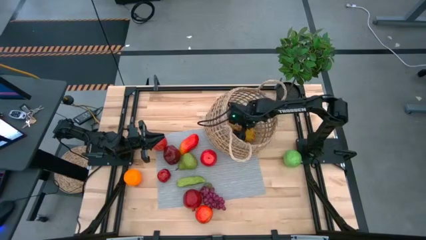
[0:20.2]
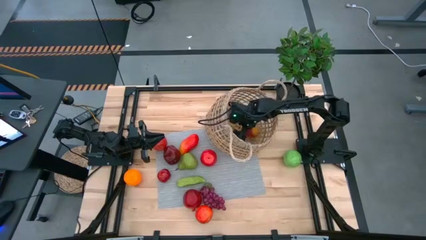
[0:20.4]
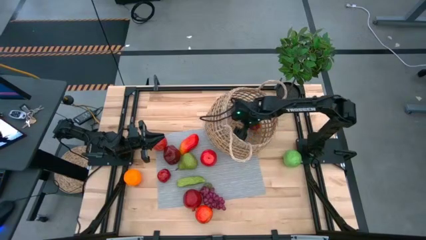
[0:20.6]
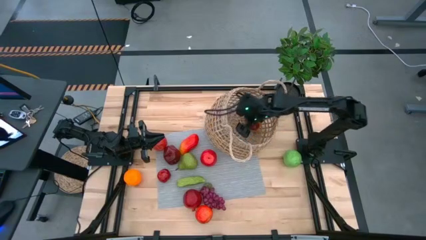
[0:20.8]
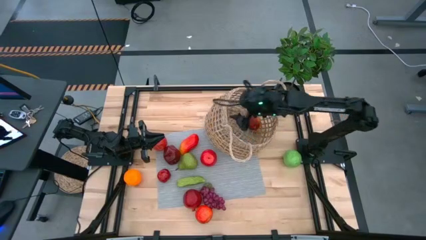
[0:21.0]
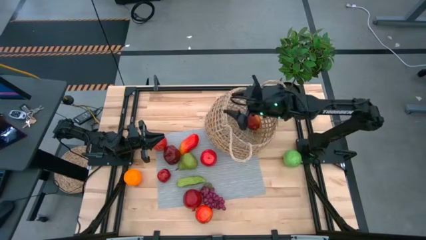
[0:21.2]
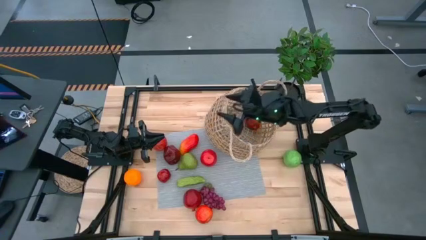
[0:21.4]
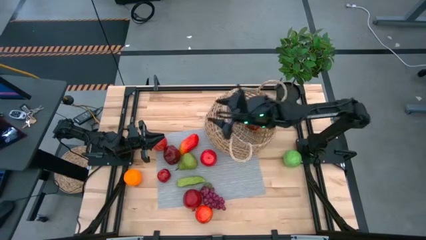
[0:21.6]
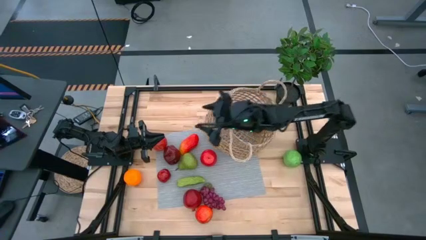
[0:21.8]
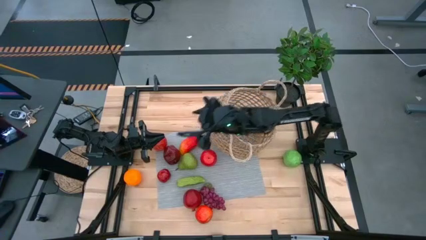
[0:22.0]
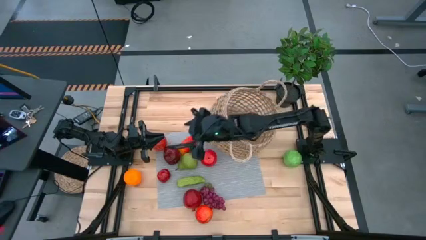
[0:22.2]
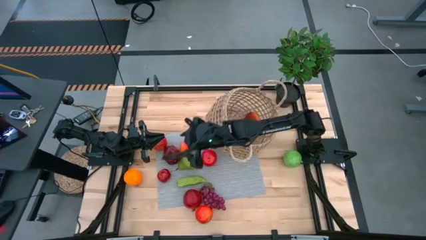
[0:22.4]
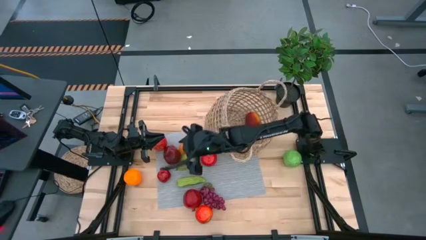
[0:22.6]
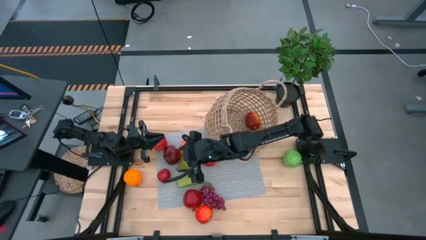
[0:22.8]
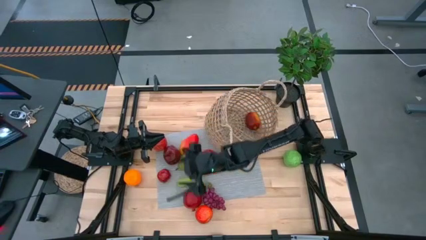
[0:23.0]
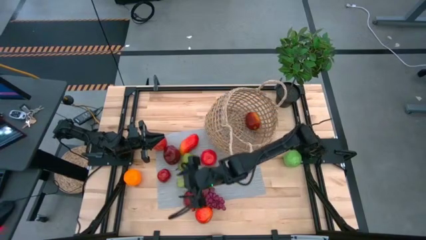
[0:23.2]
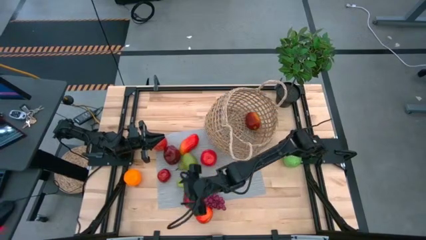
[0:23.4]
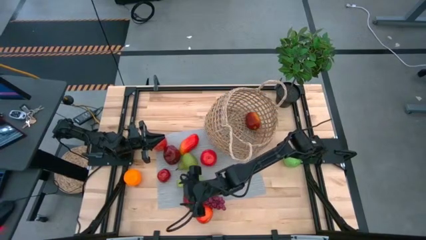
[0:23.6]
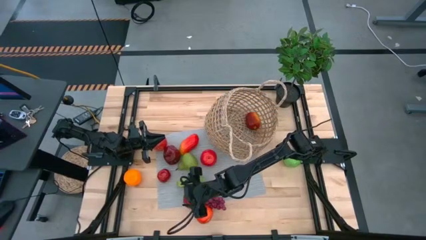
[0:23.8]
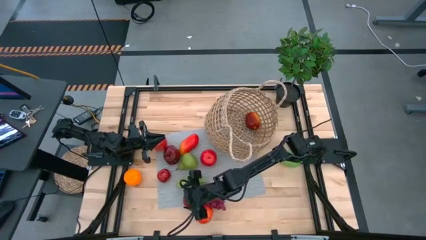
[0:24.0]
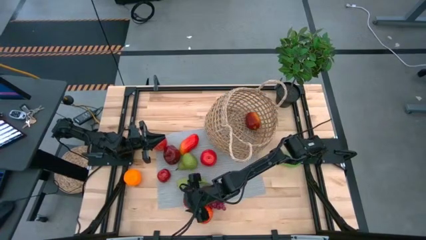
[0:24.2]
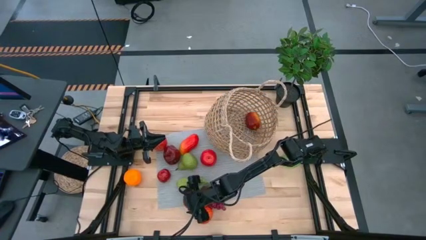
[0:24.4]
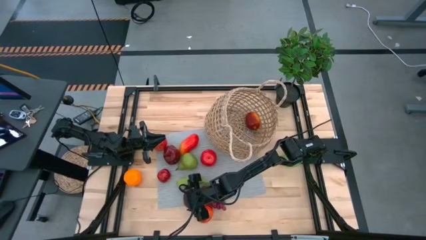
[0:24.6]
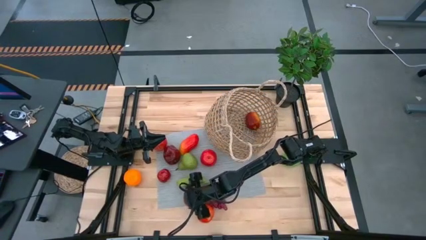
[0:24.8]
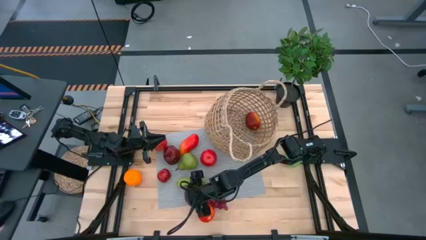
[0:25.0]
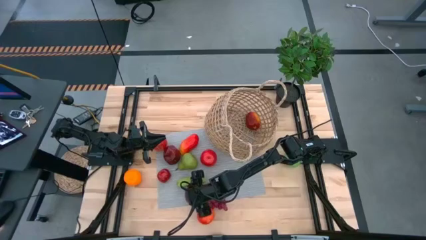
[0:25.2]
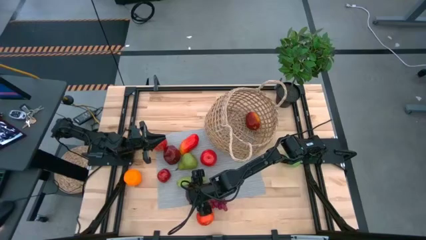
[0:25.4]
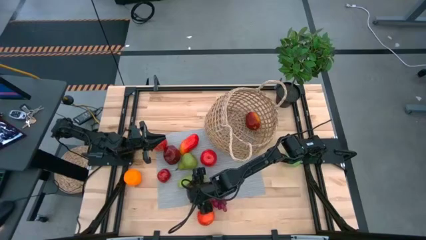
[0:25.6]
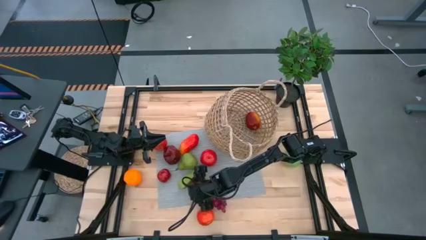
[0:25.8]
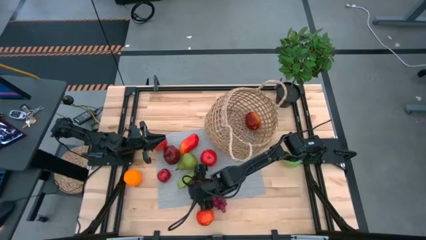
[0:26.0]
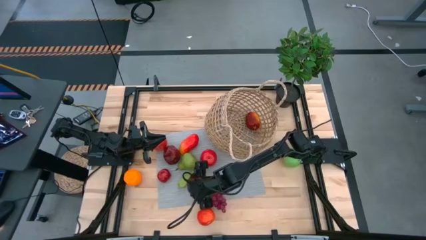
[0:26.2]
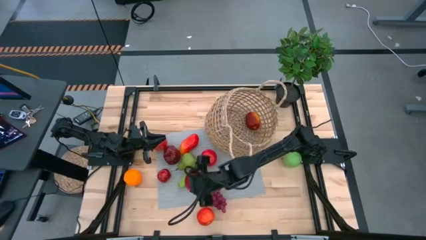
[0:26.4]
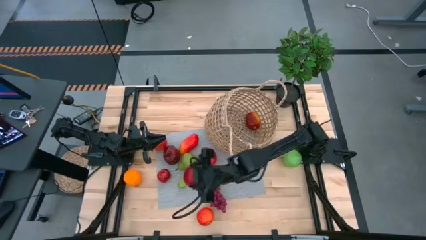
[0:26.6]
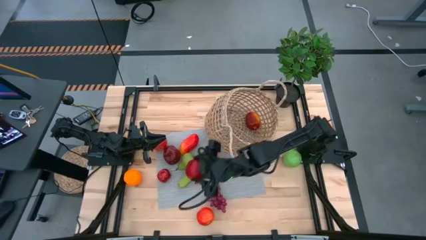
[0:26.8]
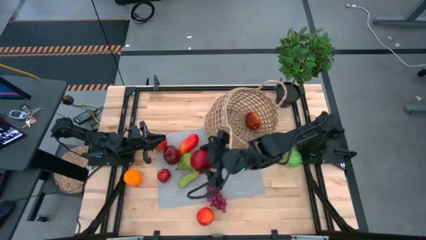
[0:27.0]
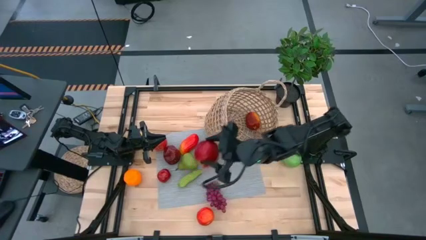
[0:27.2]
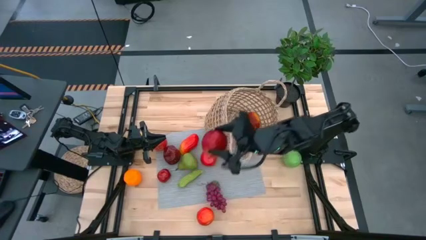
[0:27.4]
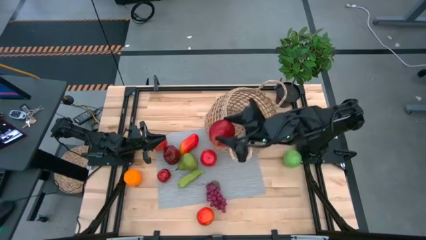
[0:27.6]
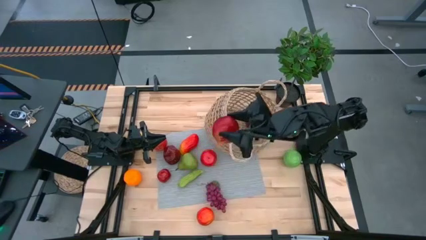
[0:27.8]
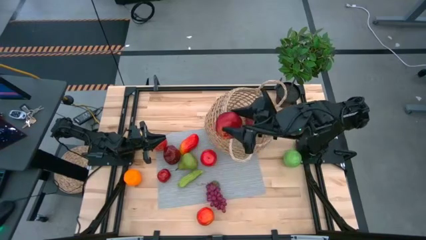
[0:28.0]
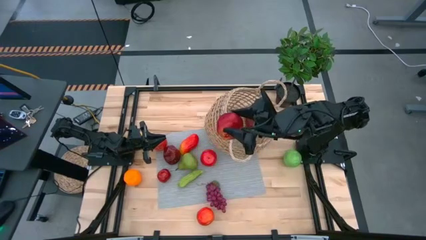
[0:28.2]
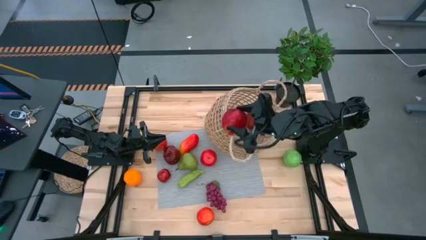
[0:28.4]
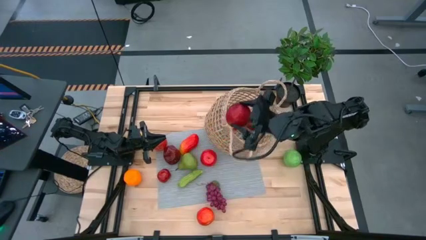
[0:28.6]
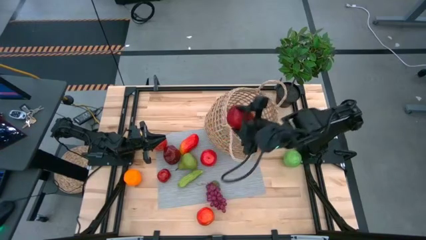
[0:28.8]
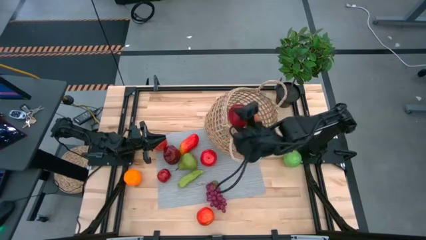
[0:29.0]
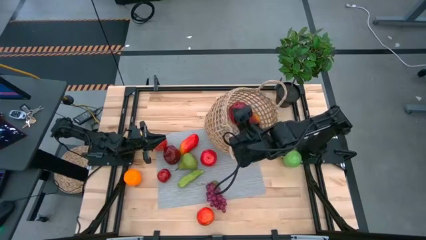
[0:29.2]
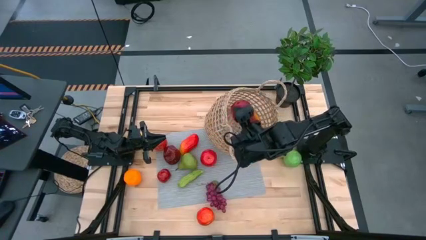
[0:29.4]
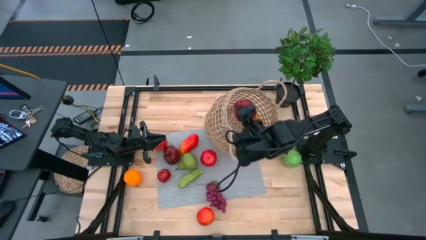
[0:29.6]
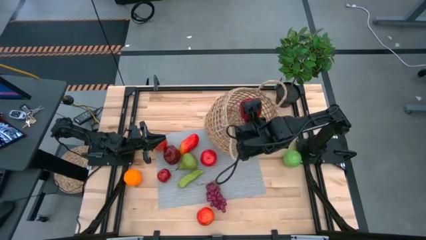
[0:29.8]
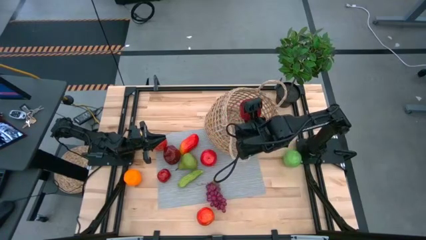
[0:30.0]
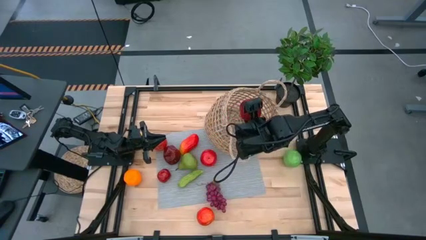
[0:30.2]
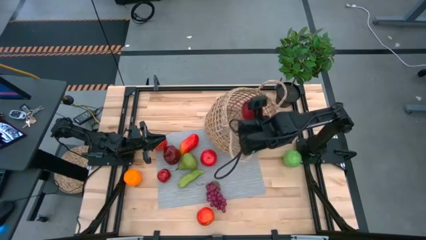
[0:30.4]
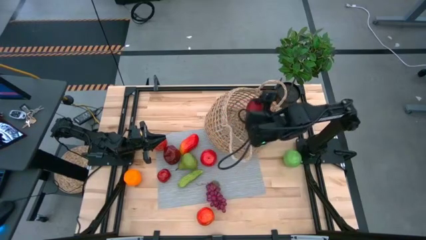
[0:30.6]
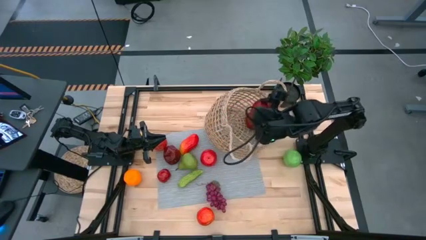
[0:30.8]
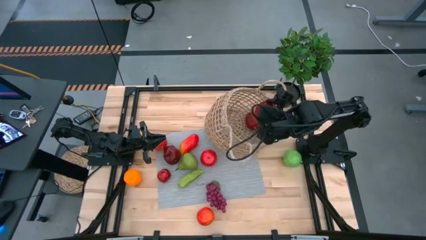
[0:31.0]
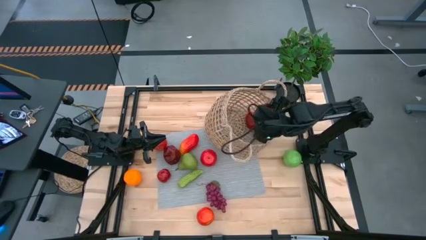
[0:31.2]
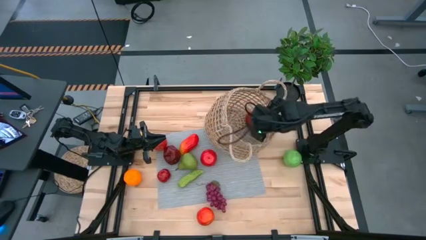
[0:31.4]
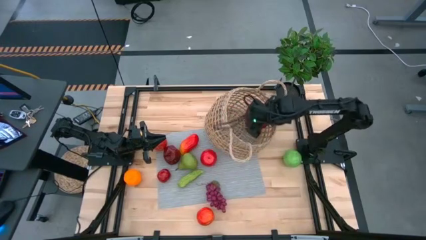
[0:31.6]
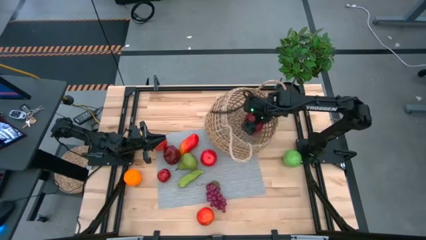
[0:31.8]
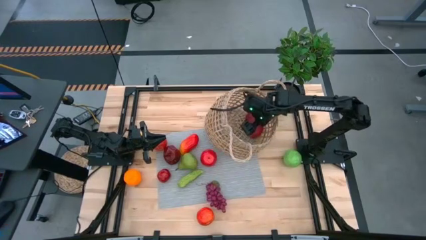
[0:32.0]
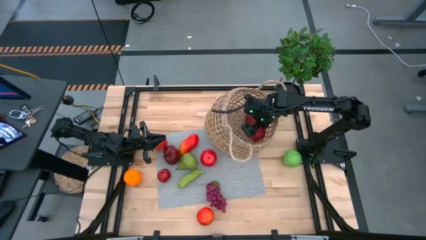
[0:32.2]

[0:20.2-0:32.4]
Task: Build produce basket
Put the pomegranate into the brown basket

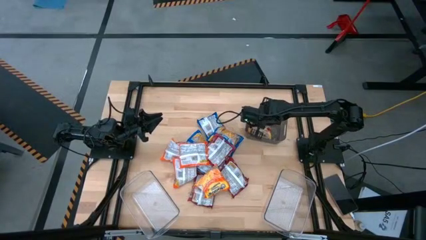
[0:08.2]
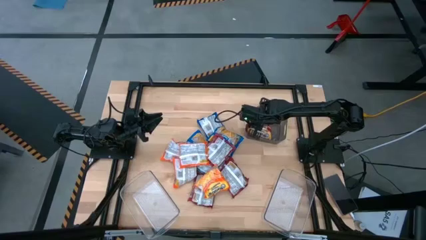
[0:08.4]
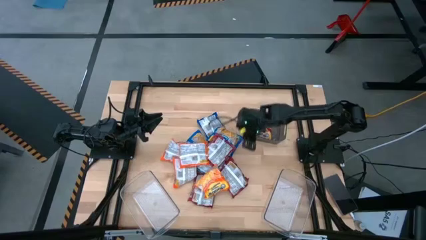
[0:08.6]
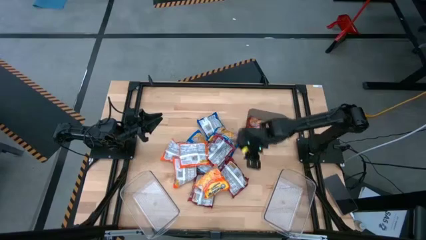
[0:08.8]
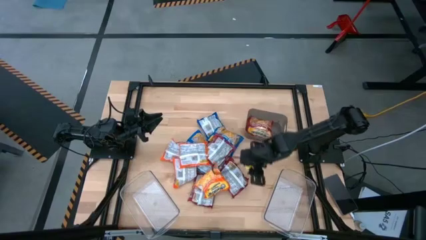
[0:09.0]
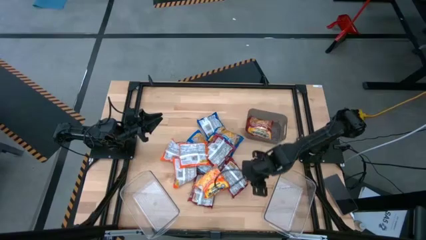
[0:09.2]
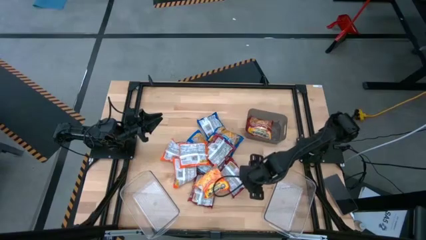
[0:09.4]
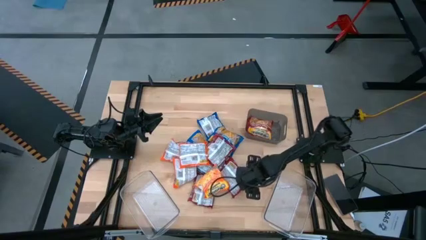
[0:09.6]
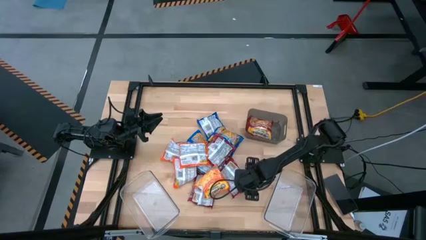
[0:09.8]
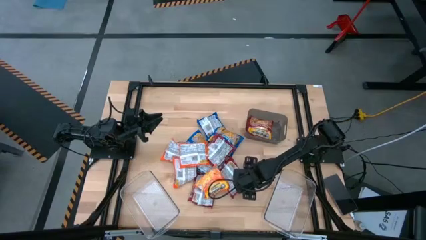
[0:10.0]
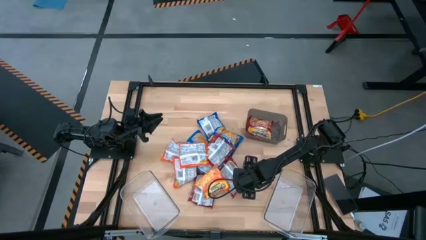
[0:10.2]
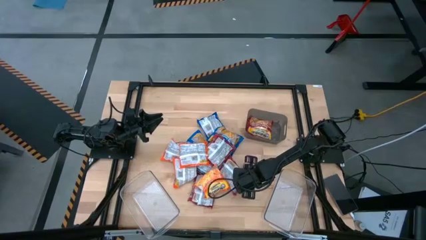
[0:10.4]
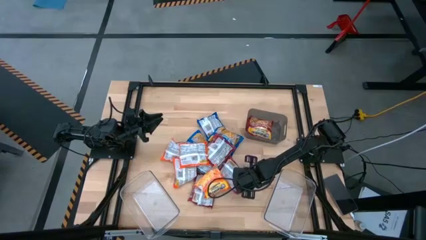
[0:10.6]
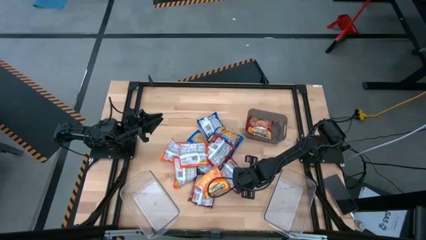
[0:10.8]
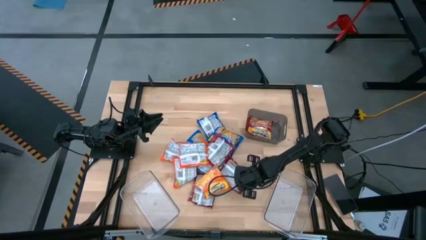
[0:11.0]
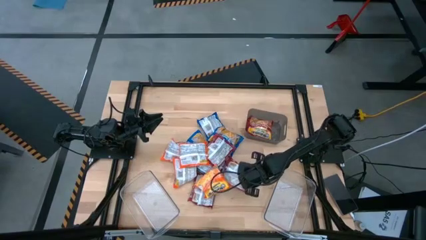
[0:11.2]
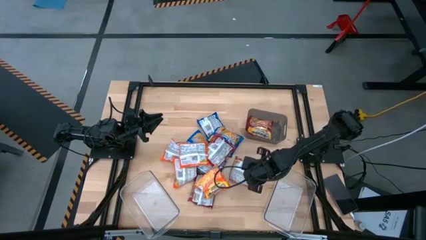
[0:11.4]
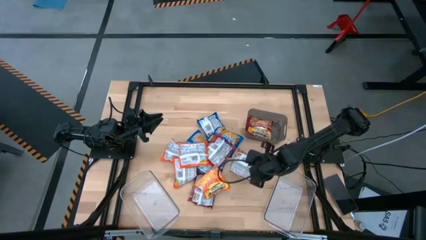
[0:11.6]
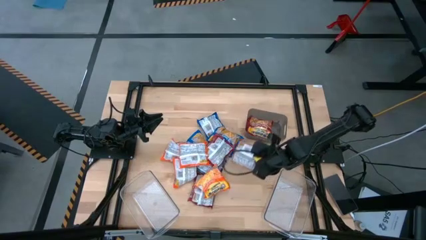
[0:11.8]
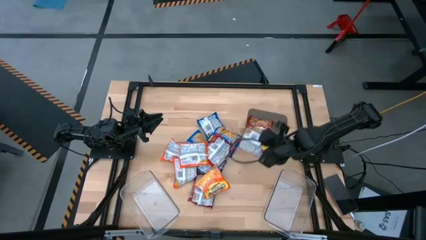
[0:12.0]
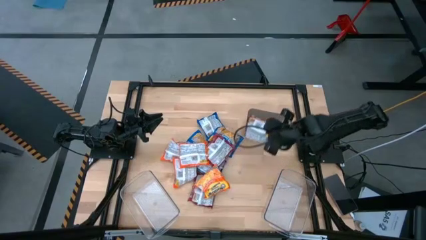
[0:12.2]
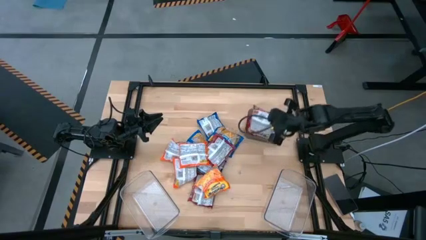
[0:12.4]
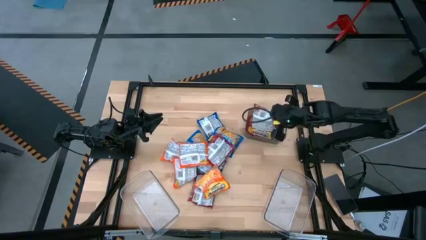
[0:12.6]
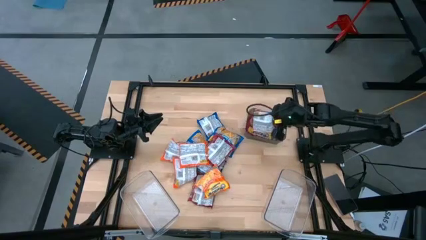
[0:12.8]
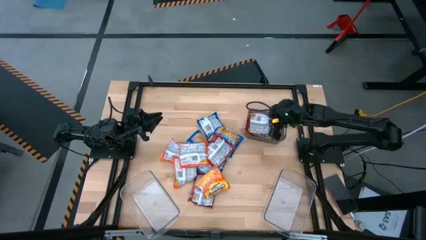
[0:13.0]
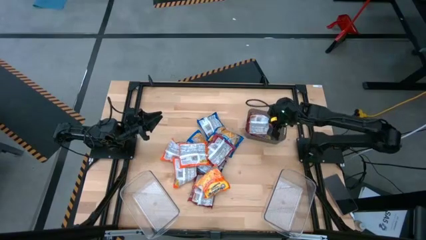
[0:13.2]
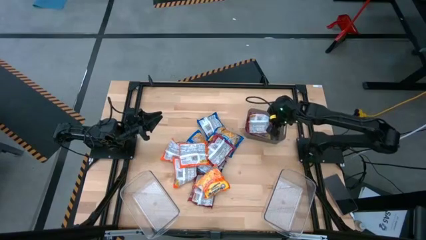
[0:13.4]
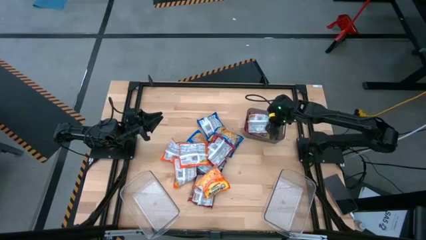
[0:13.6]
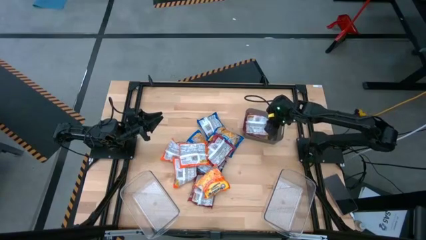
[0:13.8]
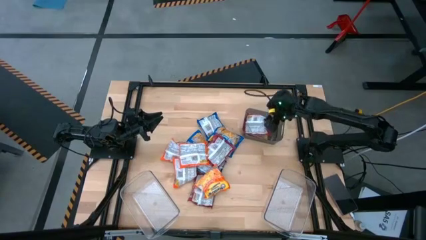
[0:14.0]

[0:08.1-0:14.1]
Task: Sort Maruchan noodles
Put the red noodle pack into the black bin
